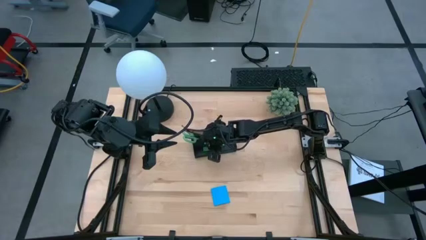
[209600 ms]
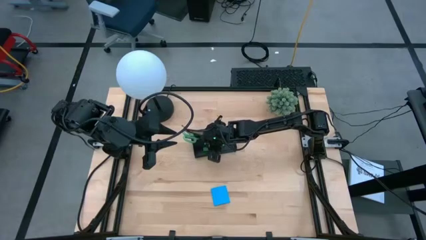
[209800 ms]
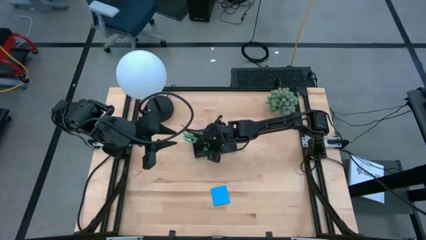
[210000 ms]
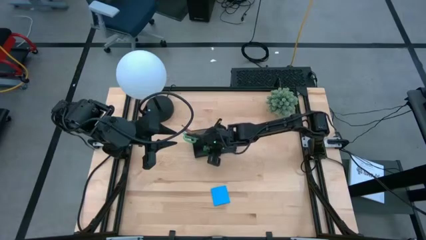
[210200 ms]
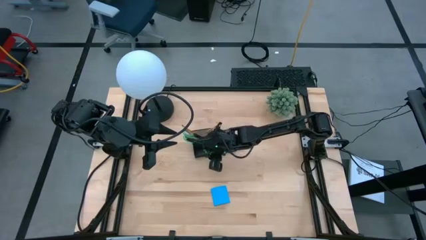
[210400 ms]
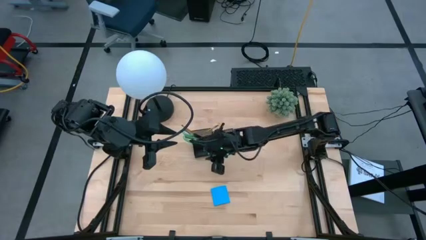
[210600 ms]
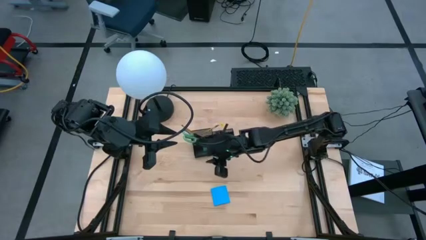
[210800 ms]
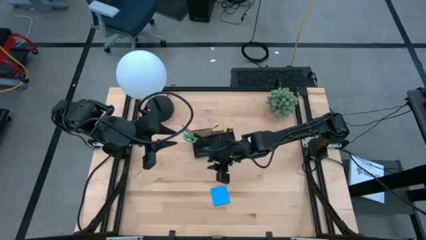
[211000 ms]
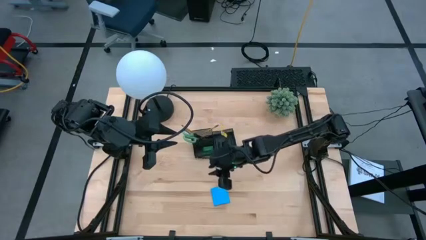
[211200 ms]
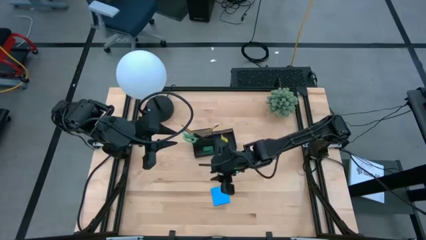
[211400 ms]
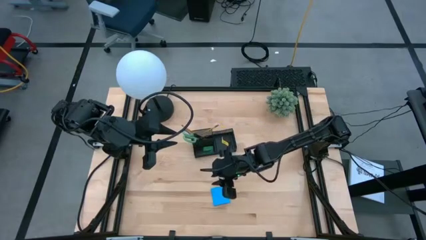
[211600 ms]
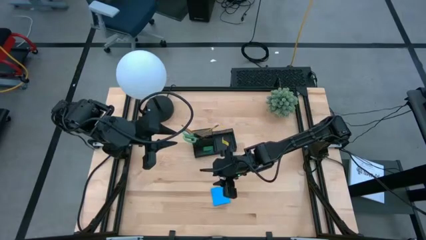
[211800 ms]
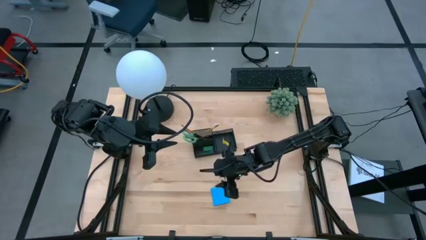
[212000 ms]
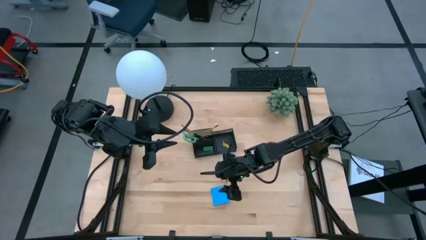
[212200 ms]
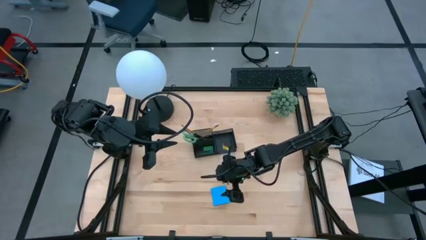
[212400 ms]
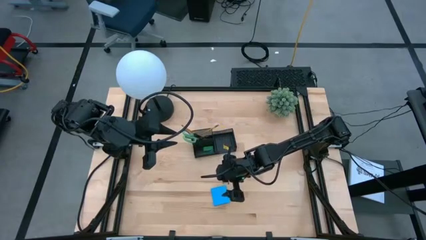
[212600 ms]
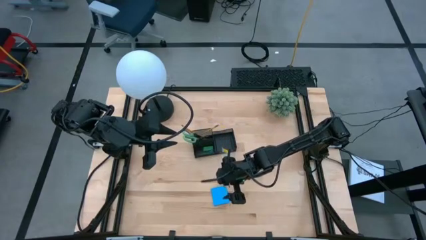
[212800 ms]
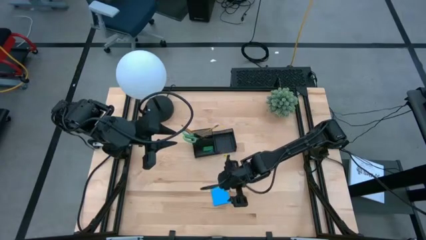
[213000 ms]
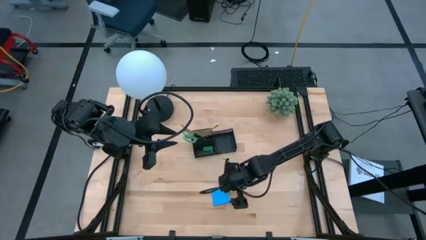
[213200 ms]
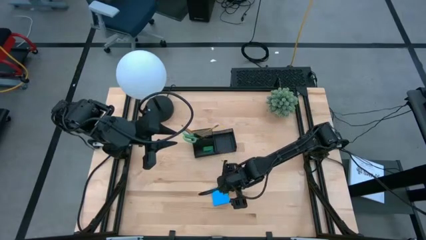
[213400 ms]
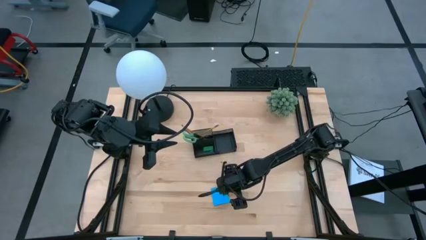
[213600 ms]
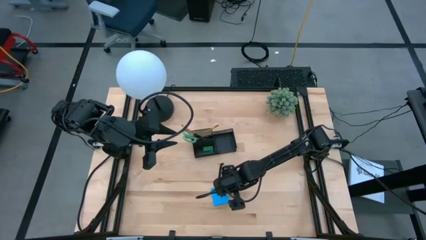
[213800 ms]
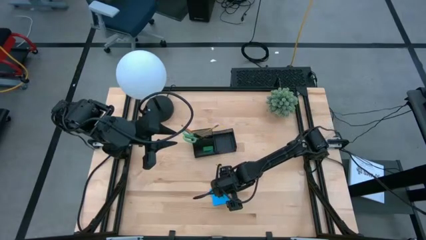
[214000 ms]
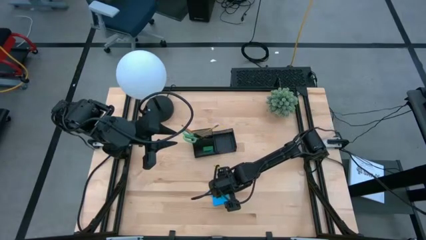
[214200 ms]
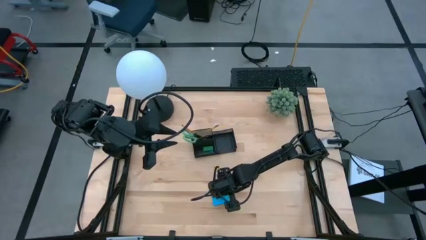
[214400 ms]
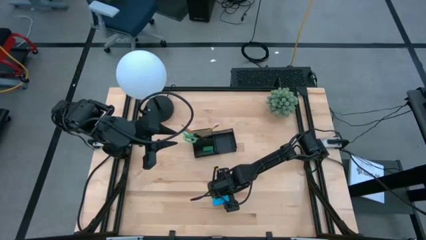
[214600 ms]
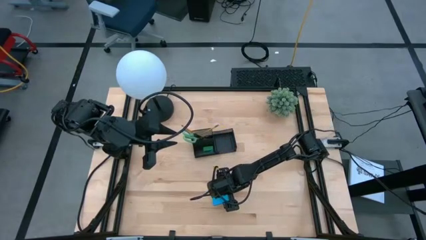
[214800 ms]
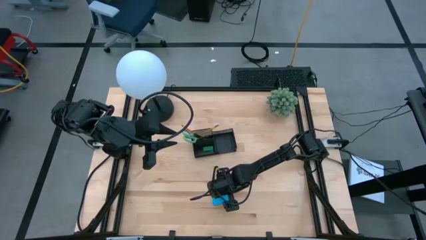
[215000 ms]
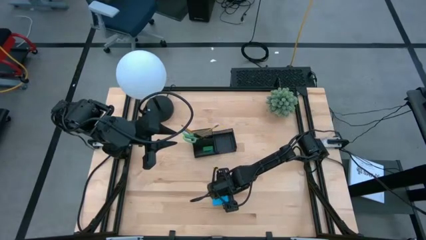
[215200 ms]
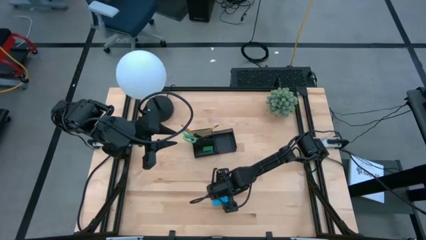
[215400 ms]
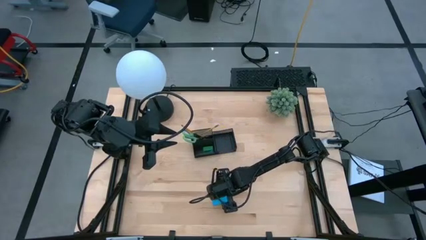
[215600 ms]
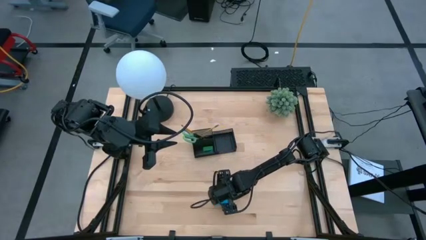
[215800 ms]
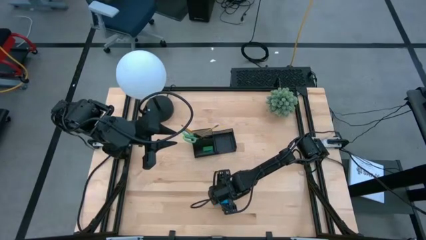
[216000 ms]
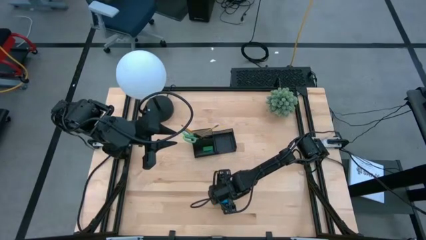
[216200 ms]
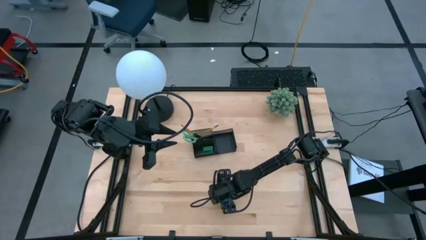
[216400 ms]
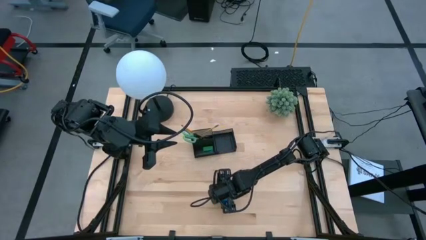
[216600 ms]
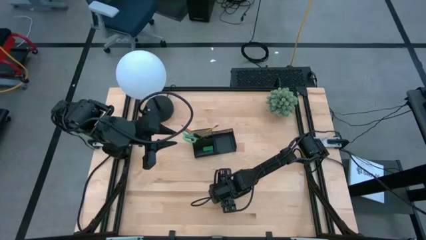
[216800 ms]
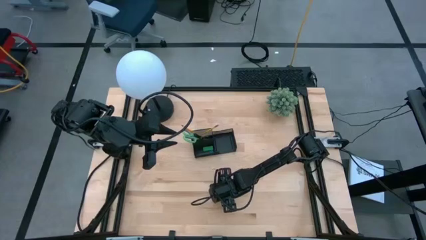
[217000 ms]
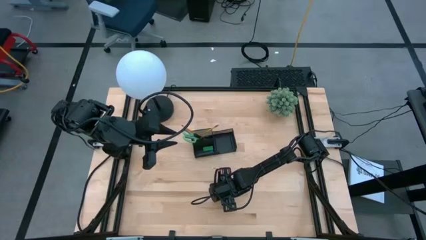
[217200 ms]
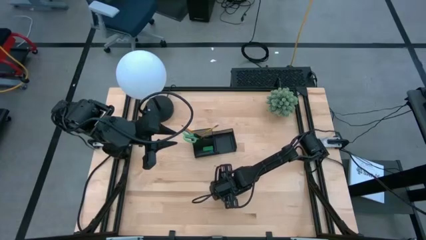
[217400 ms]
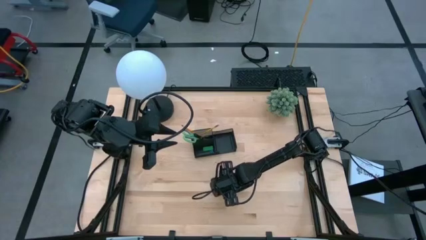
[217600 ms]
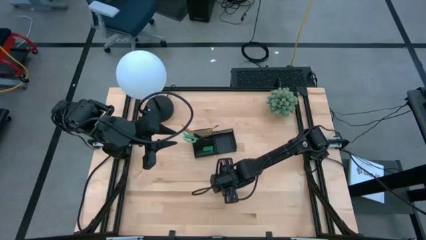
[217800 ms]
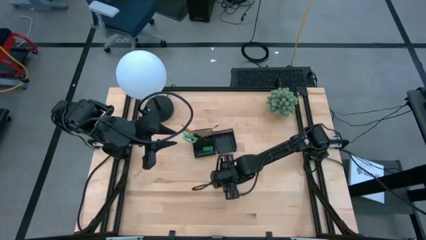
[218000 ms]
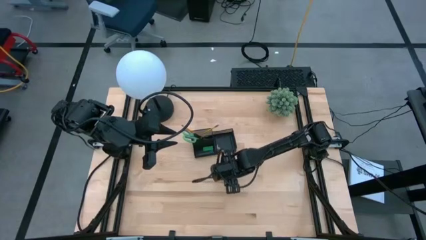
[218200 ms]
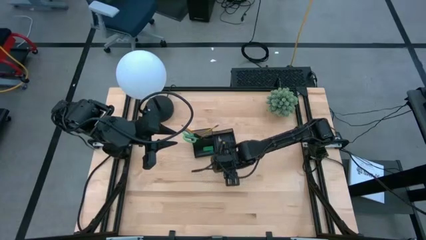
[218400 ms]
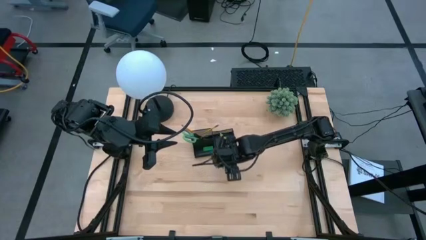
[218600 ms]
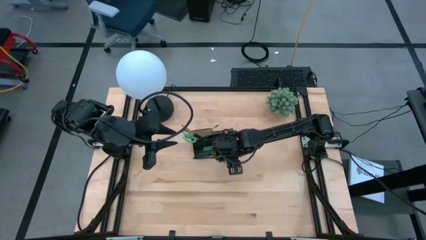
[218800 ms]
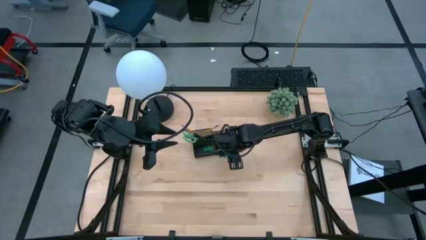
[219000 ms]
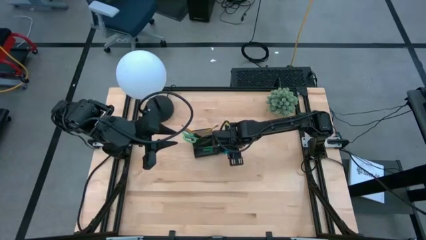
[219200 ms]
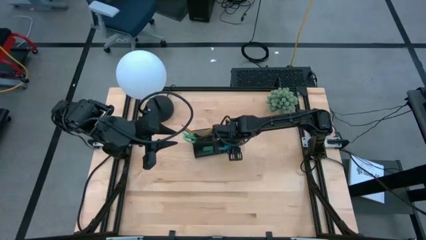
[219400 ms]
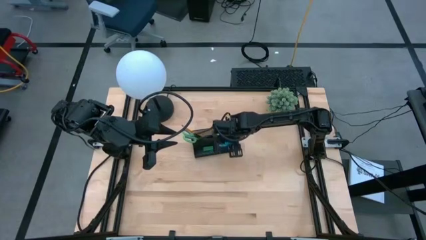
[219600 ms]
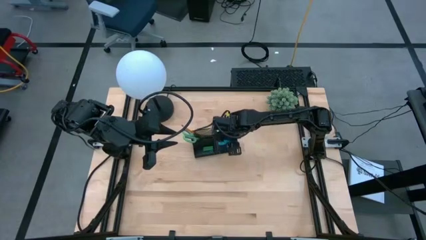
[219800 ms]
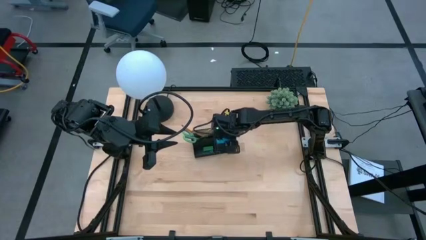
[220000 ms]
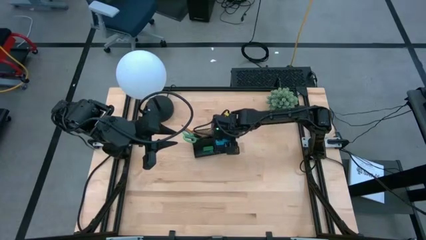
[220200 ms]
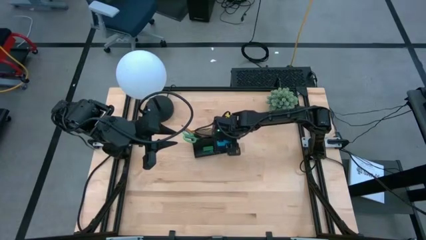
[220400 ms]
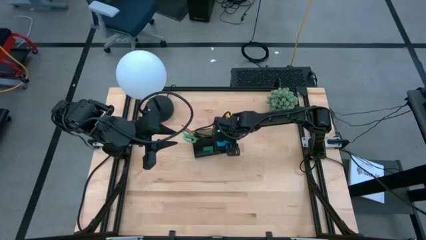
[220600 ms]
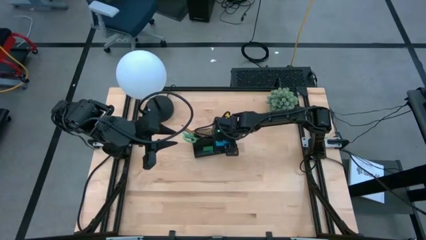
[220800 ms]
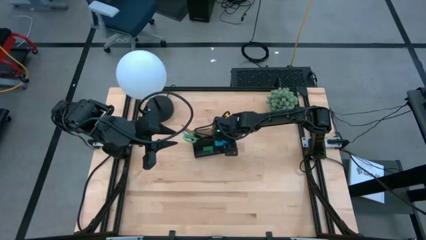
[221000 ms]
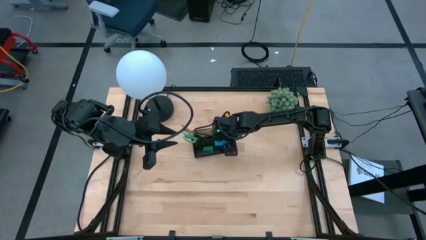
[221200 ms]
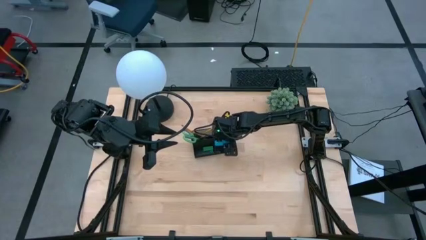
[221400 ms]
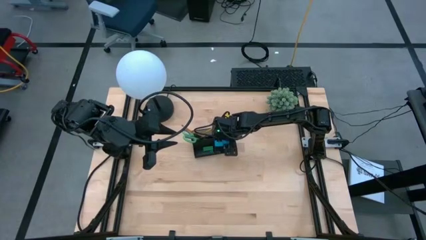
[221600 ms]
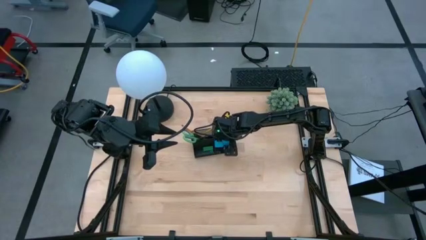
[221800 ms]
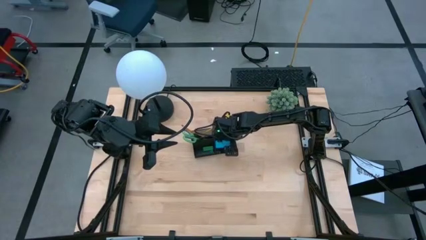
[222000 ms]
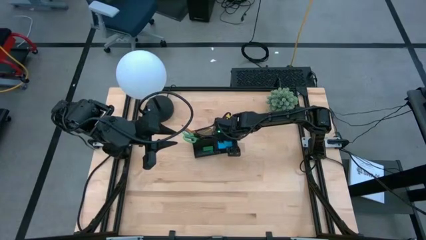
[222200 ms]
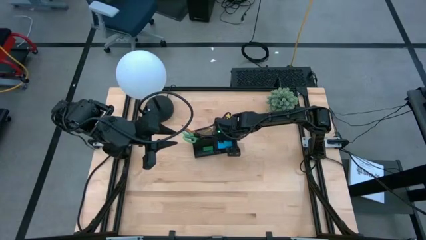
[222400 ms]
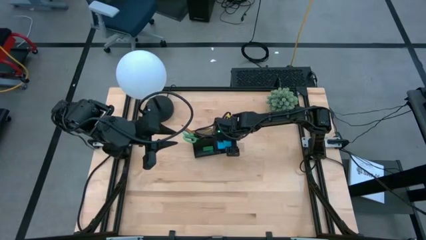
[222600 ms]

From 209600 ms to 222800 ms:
Task: Pick and place office supplies into organizer
Put the blue sticky notes into the black desk organizer

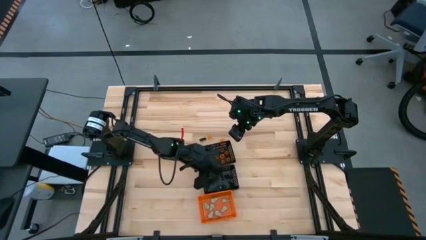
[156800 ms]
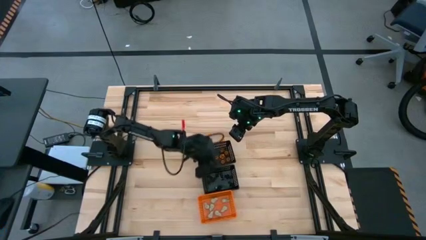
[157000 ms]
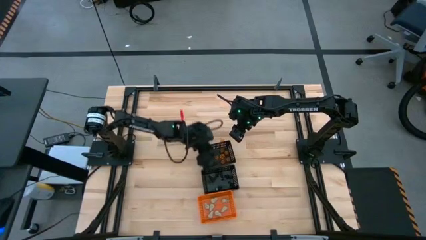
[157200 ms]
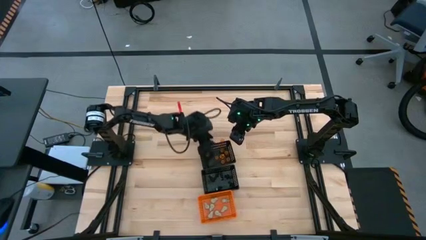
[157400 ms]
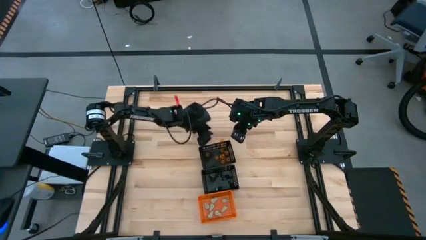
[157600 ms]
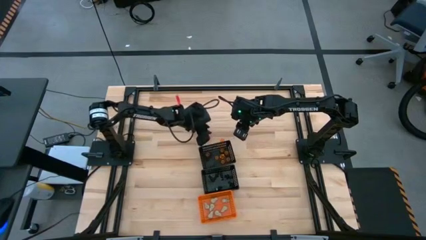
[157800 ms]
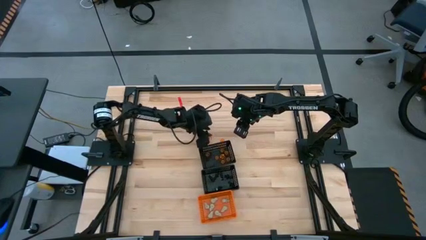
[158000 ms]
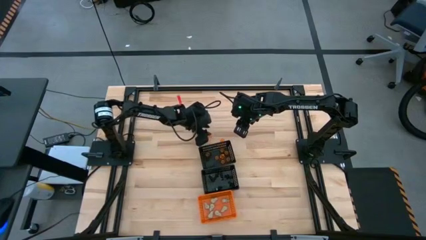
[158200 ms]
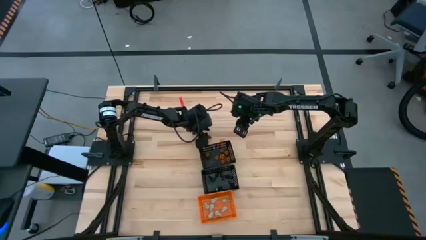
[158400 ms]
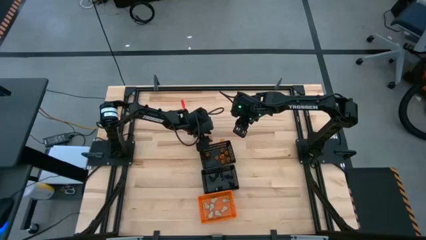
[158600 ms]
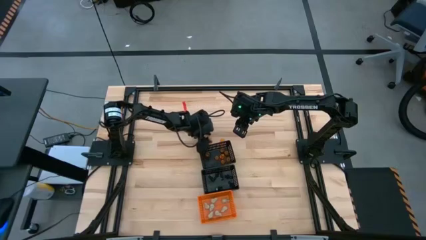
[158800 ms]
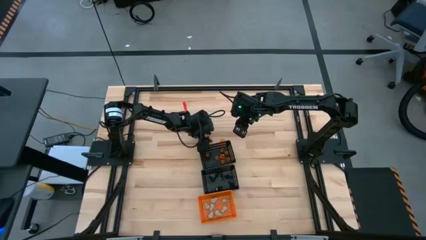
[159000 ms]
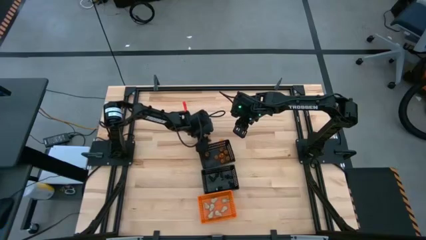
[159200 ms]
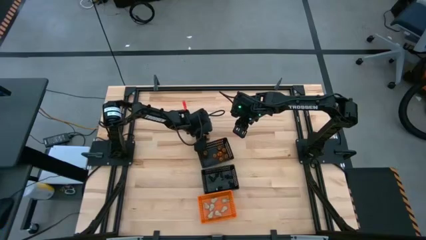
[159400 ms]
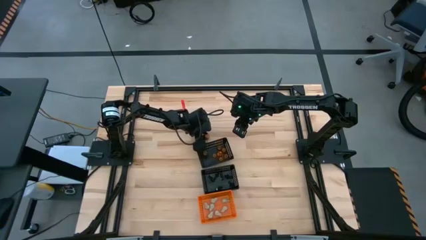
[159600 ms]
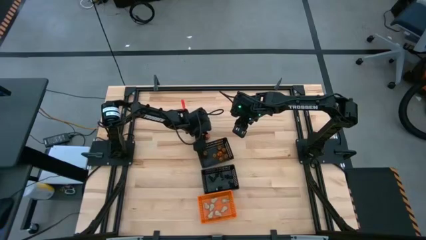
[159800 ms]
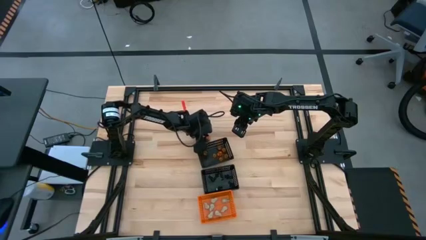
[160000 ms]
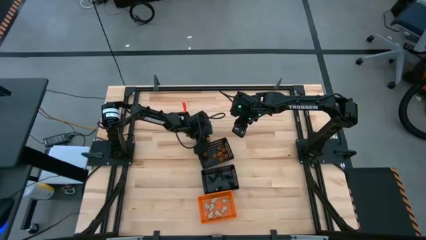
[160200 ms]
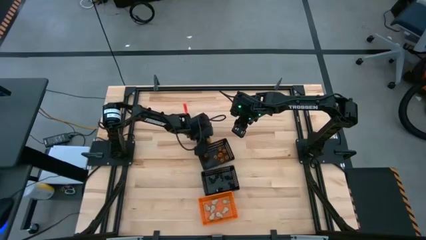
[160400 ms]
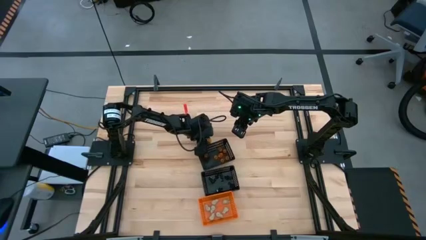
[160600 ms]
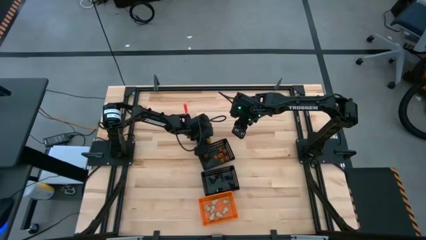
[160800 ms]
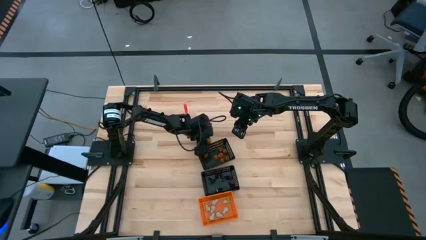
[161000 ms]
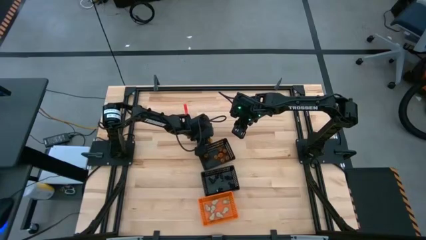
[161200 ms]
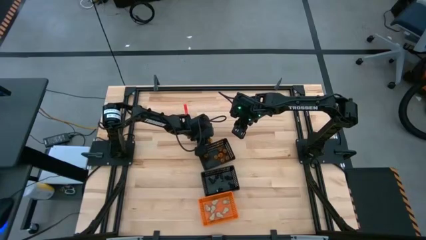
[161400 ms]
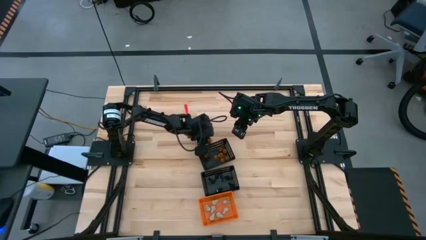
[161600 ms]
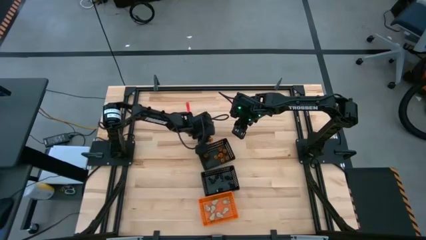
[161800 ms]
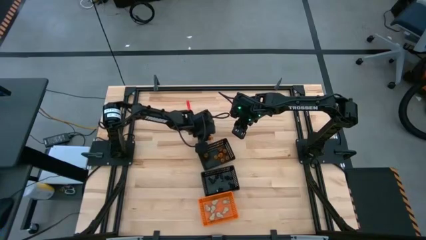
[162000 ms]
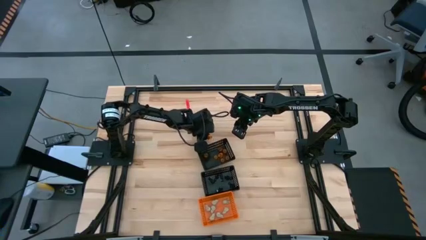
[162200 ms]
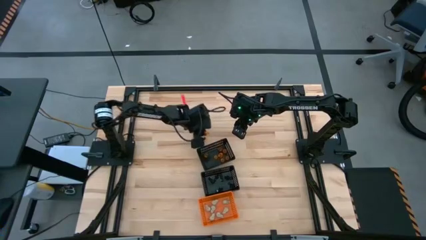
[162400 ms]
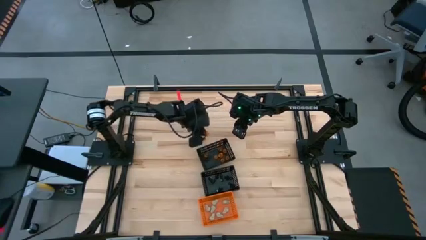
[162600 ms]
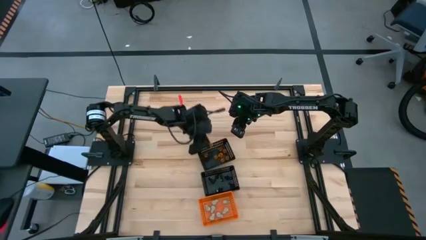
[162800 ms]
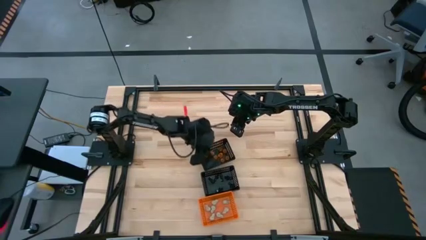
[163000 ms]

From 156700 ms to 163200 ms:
Task: Sort Halloween decoration
Put the orange pumpkin toy into the top black bin
